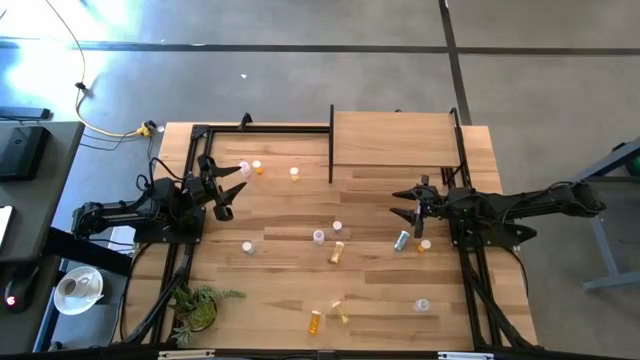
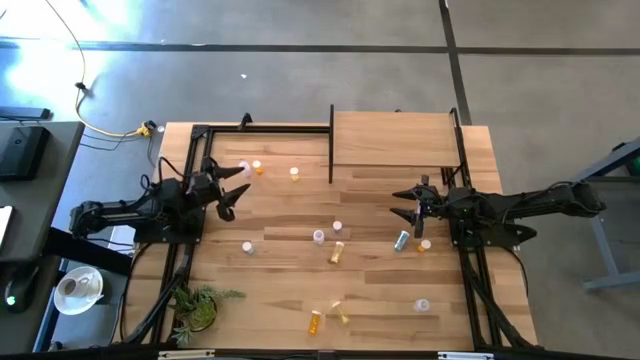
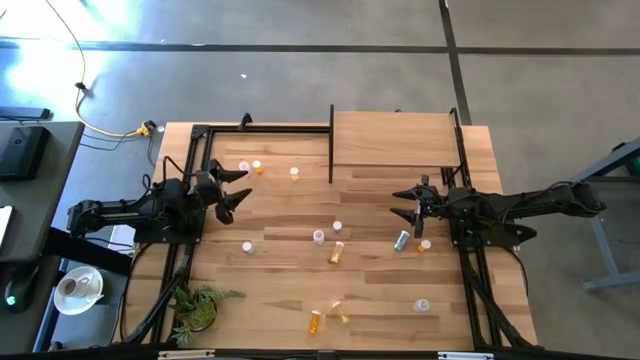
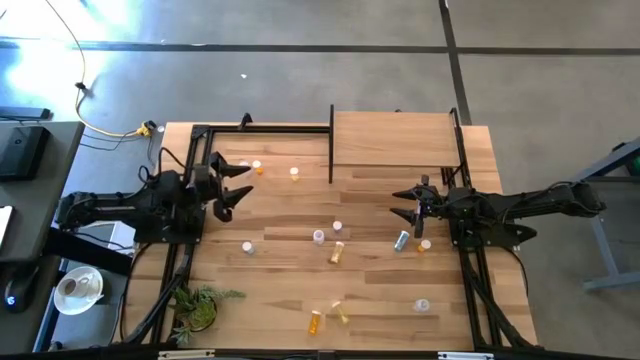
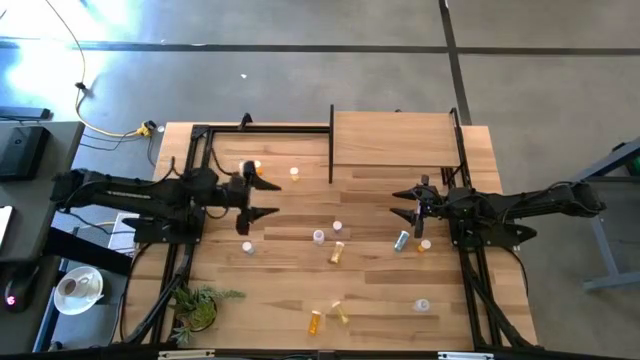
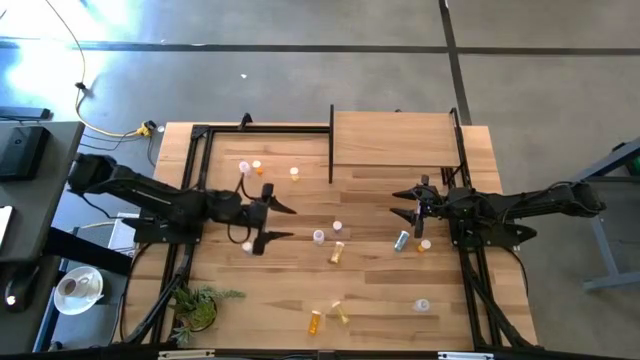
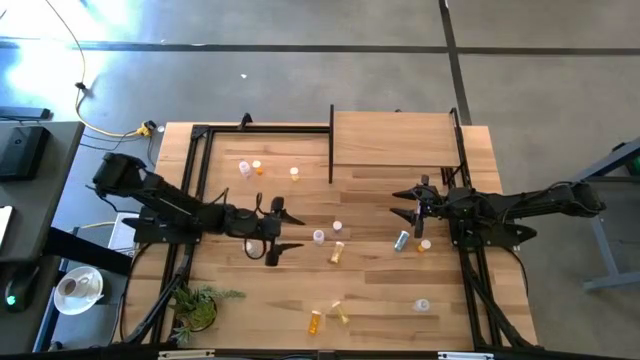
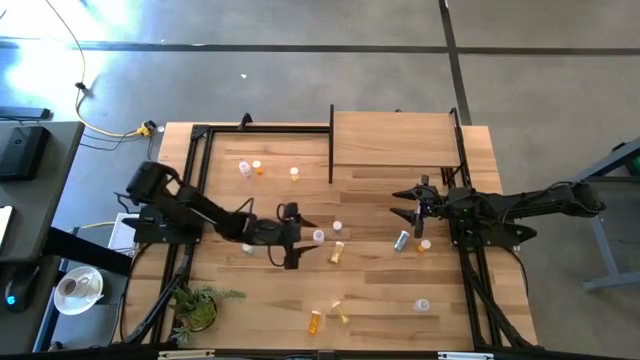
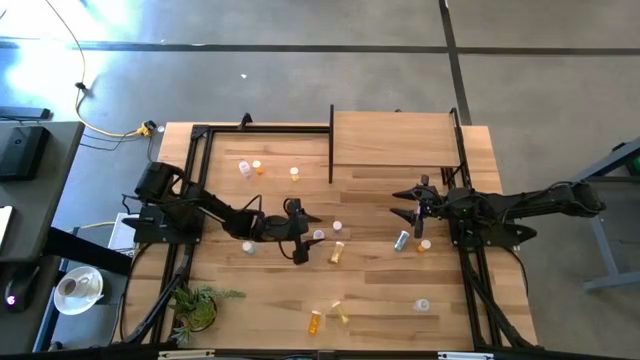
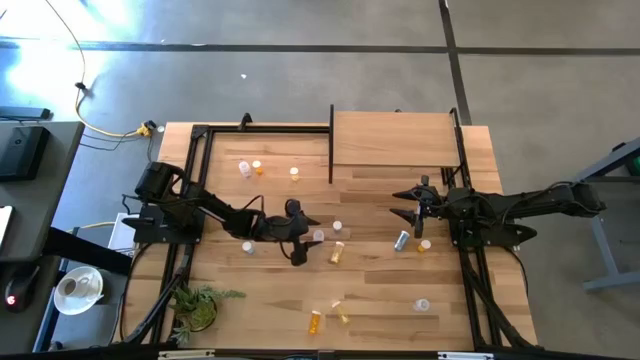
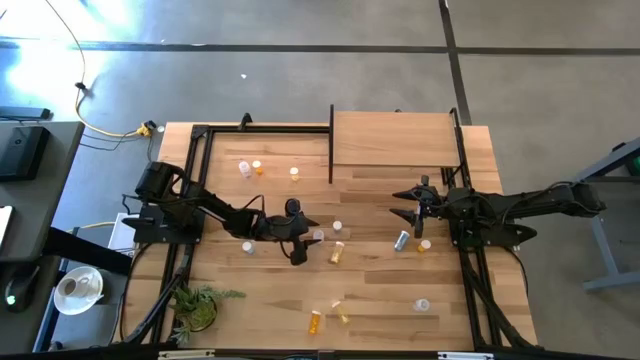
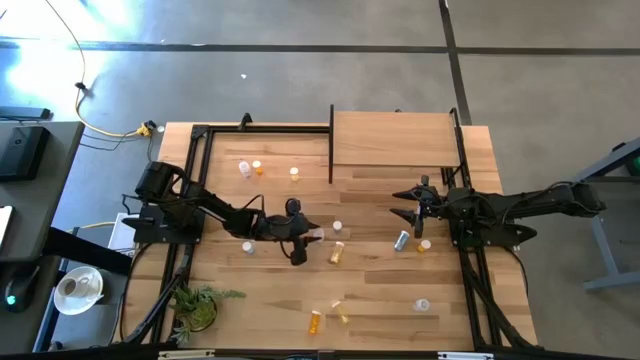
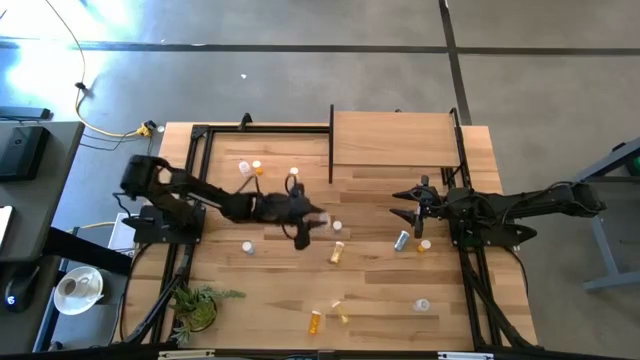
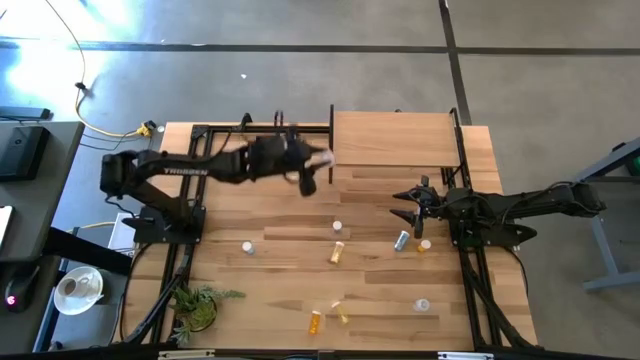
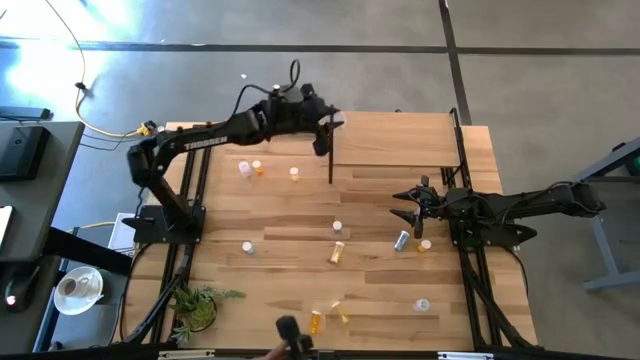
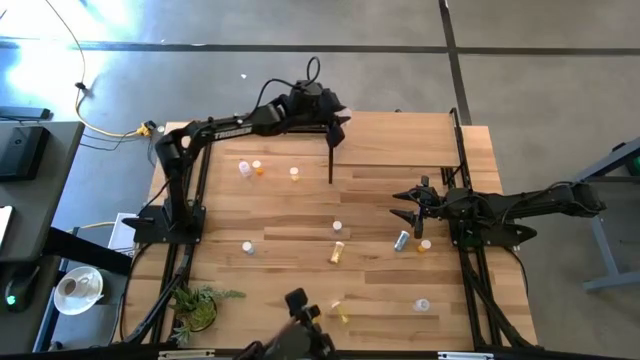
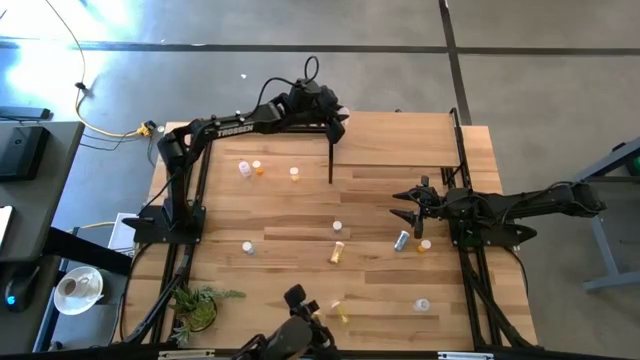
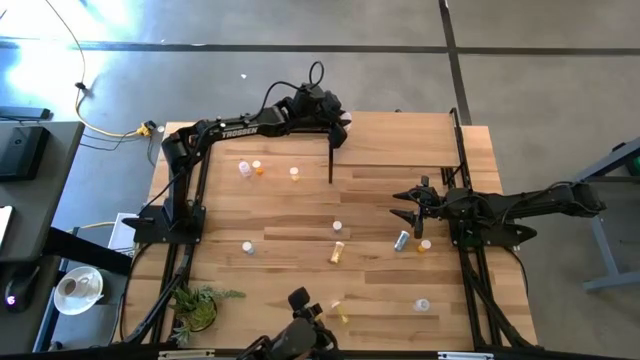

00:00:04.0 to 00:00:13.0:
Task: Pick and place medicine bottles onto shelf by color
Put the middle transparent pill bottle on the shelf

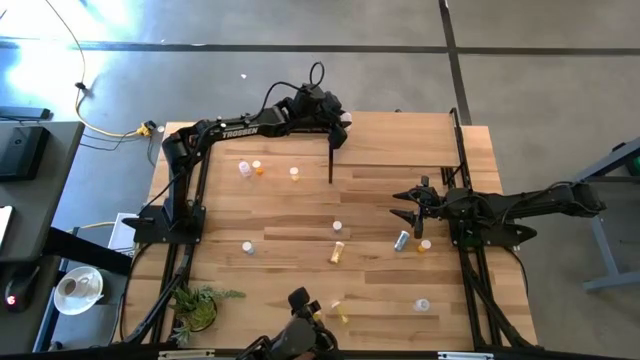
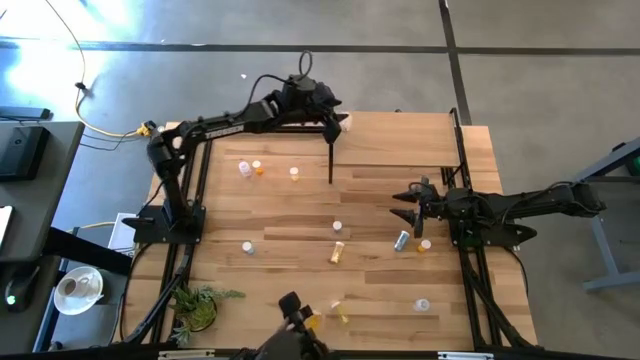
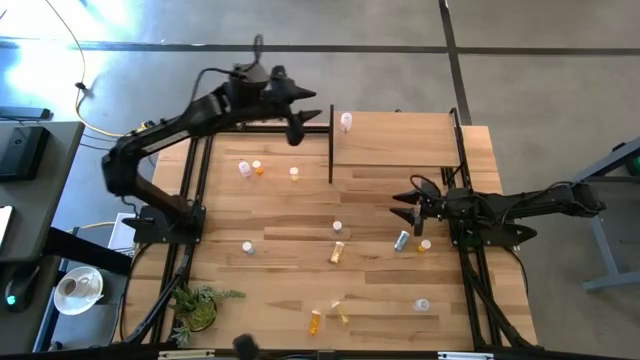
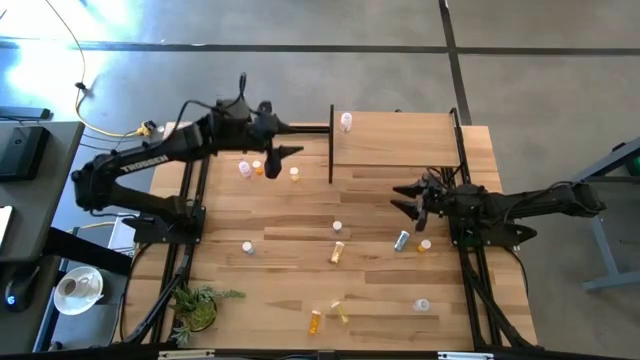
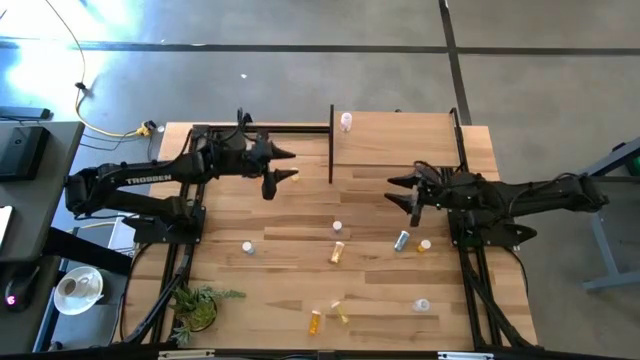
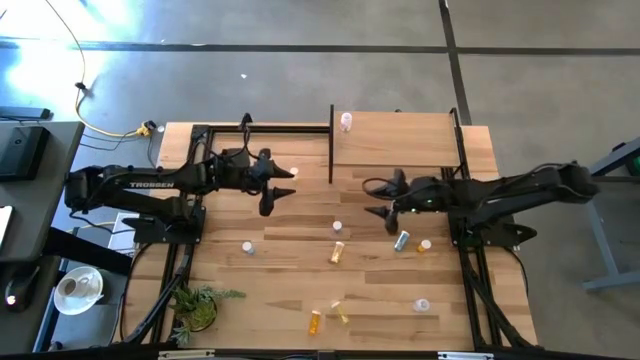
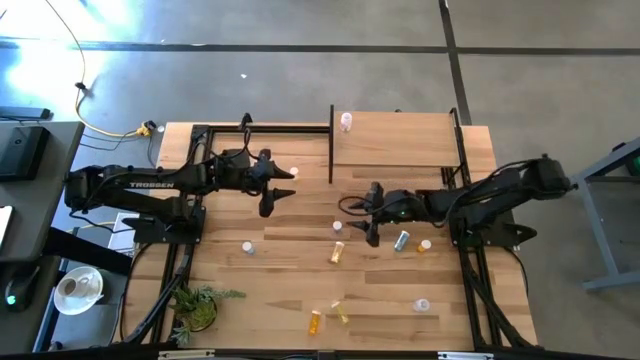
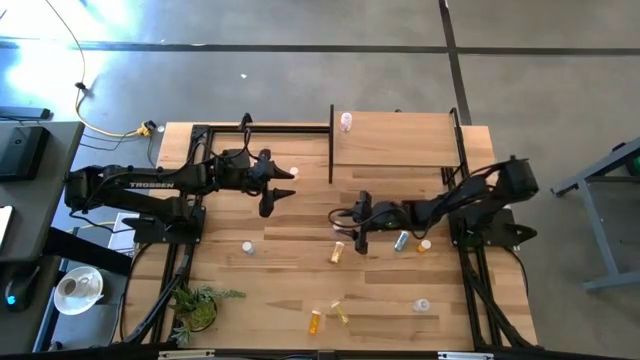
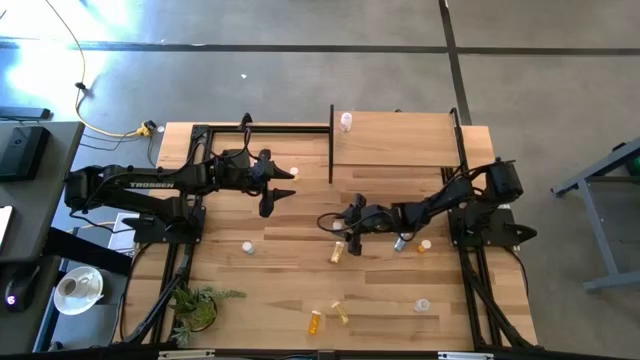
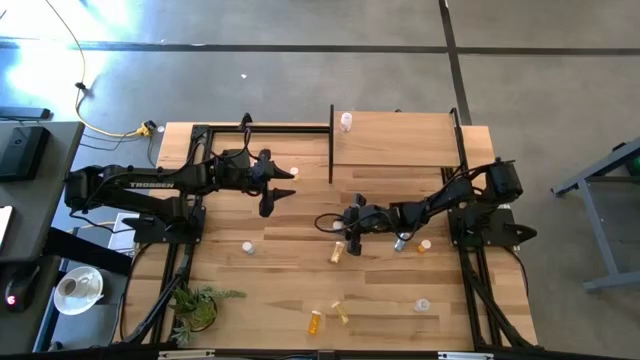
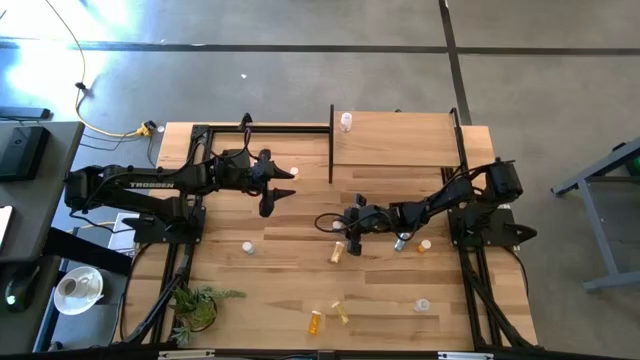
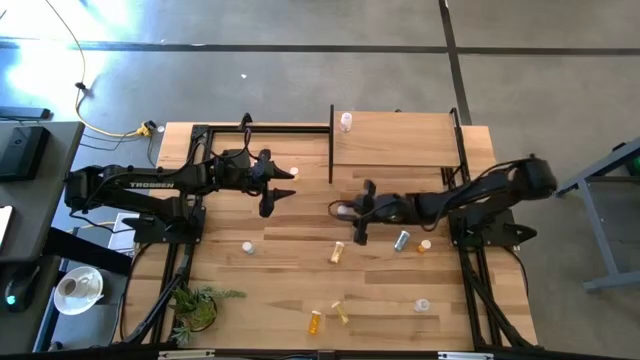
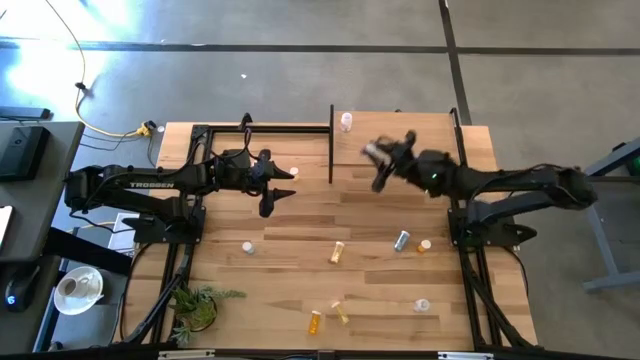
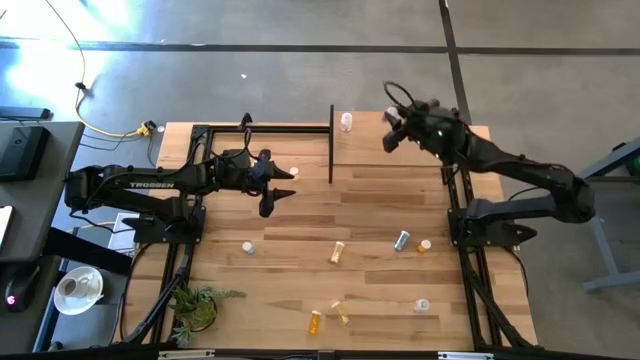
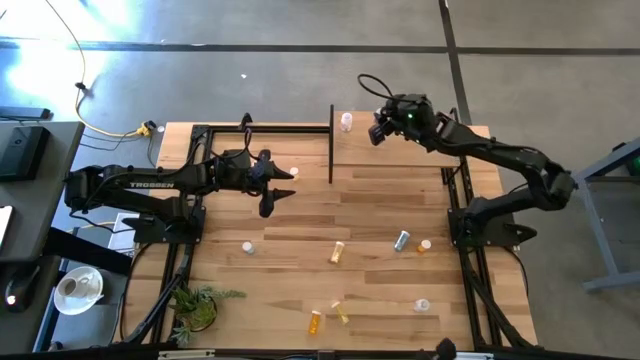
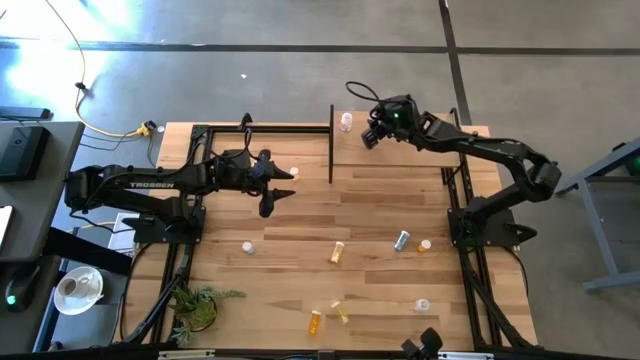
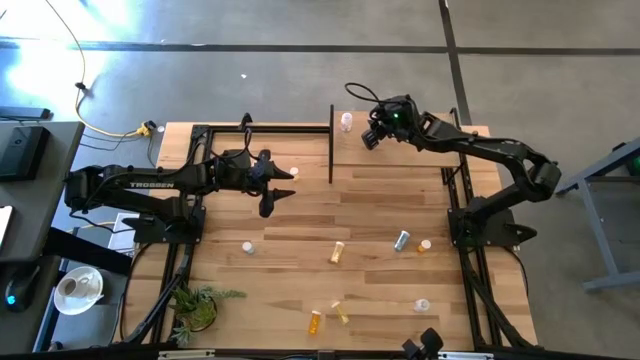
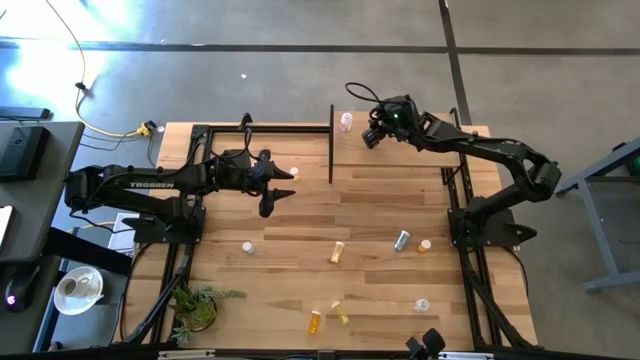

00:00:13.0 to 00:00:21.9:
Put the middle blue pill bottle on the shelf

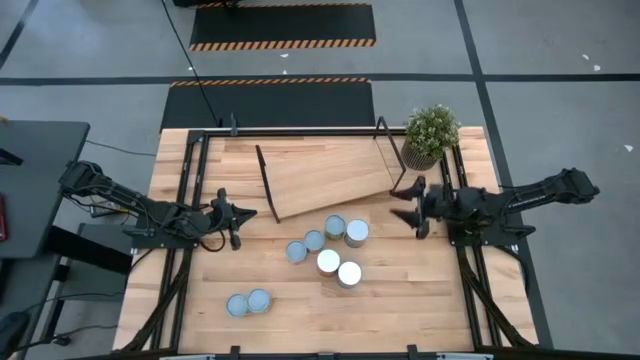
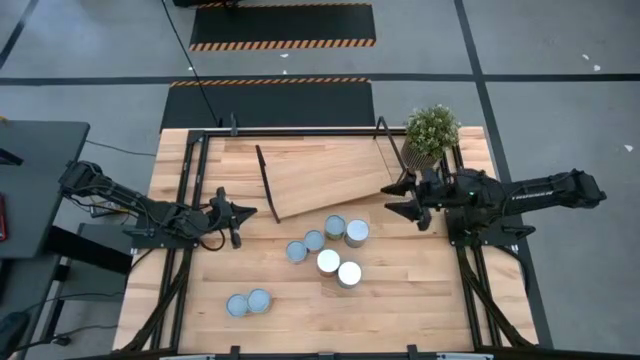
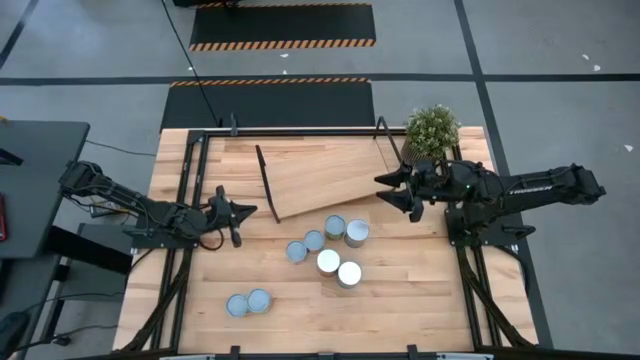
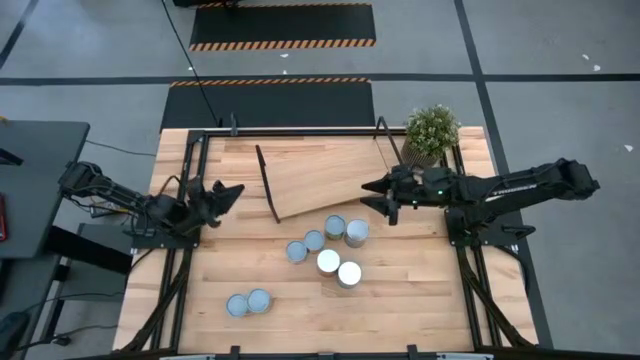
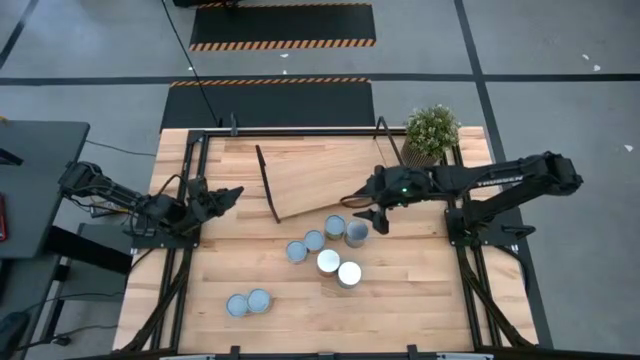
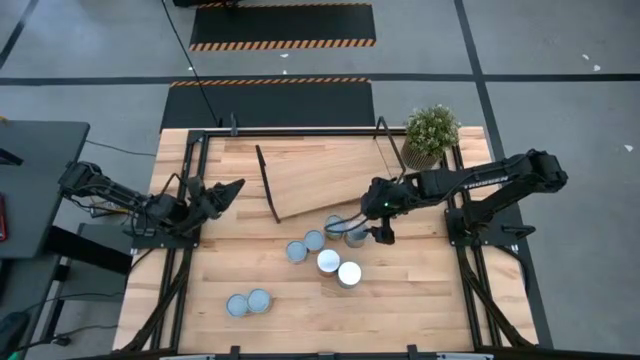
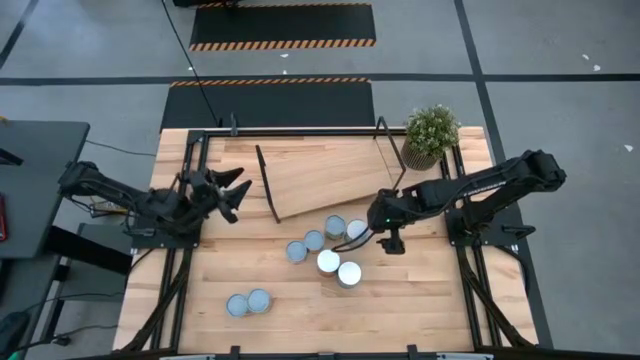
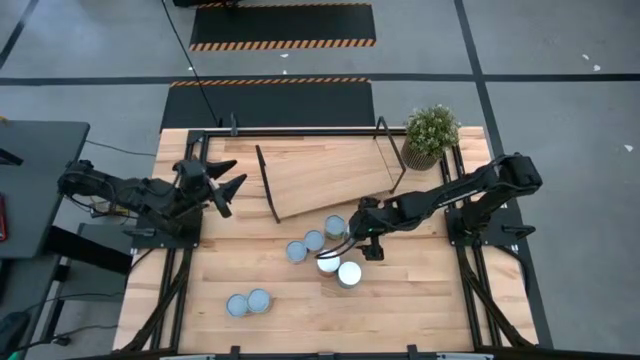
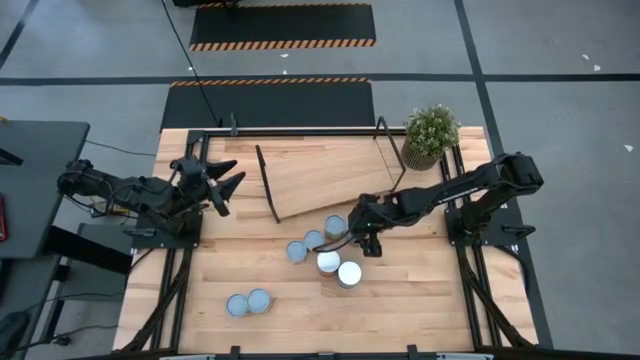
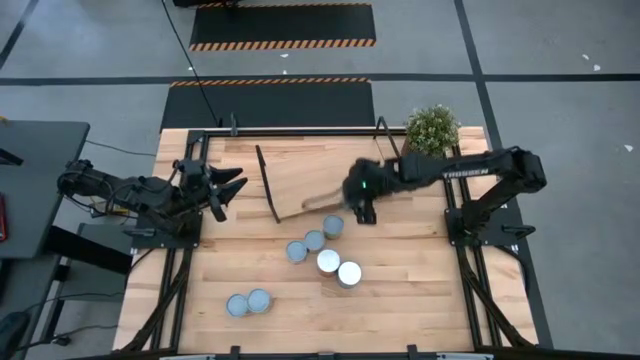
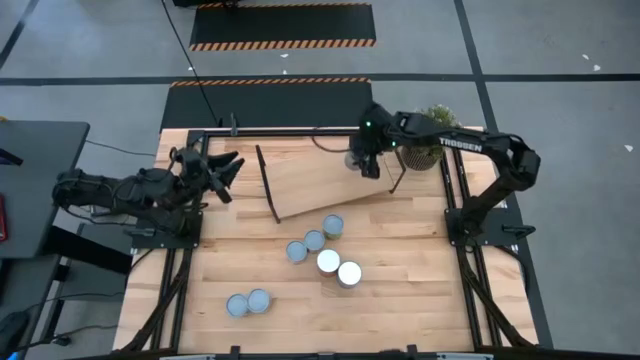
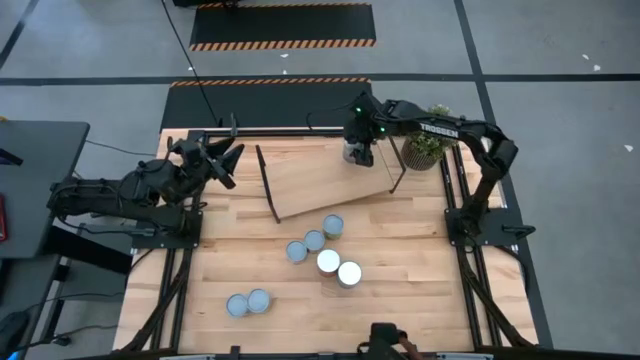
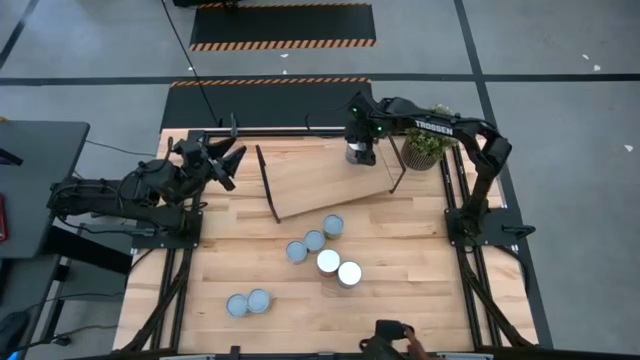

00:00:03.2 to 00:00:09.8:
Task: Pick and place cans onto a shelf
Put the top blue can on the shelf
